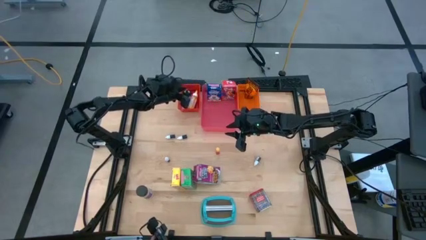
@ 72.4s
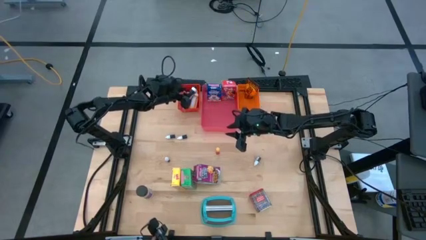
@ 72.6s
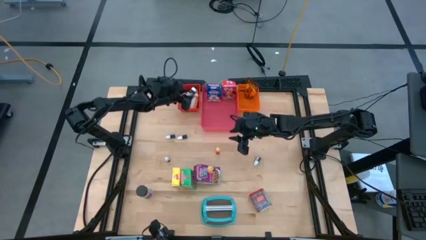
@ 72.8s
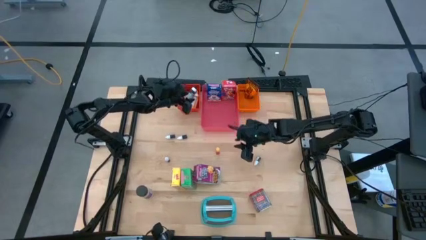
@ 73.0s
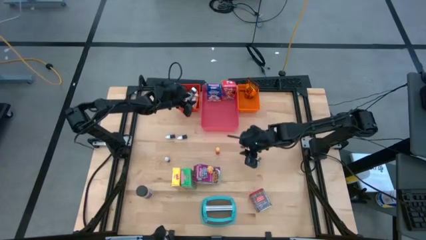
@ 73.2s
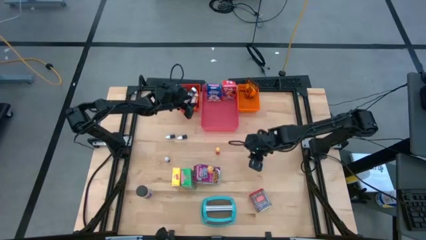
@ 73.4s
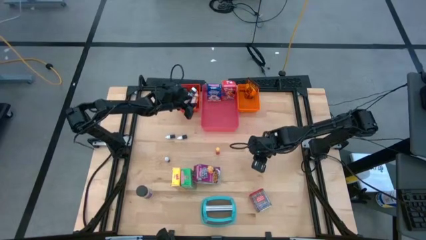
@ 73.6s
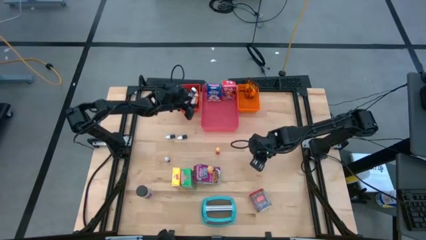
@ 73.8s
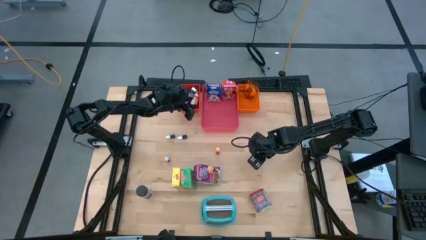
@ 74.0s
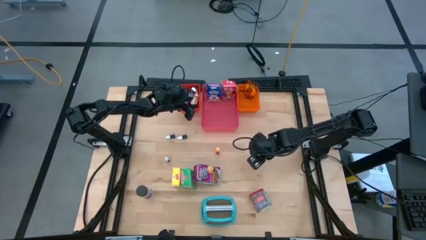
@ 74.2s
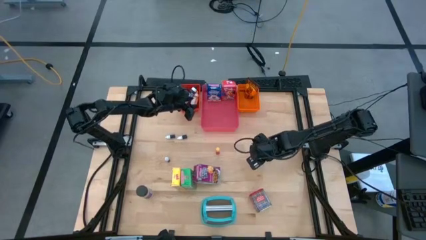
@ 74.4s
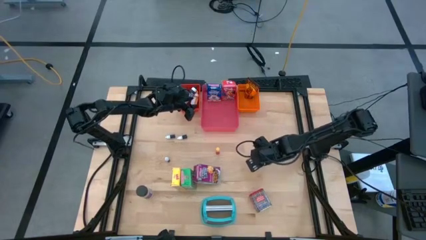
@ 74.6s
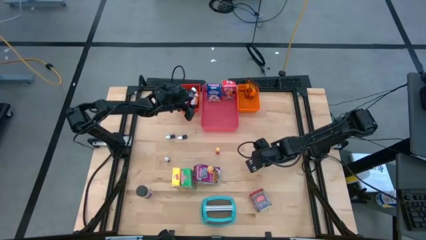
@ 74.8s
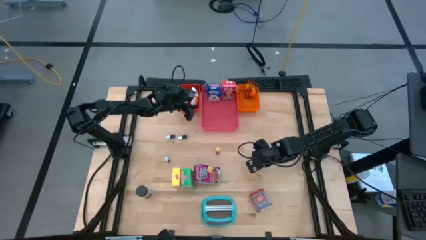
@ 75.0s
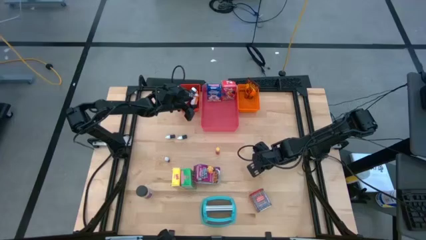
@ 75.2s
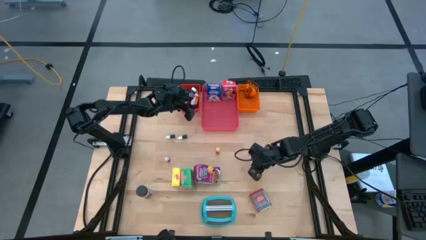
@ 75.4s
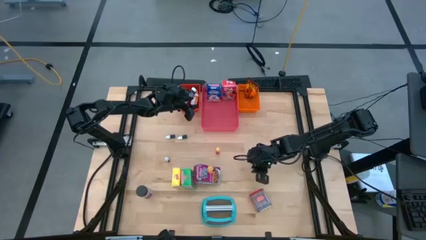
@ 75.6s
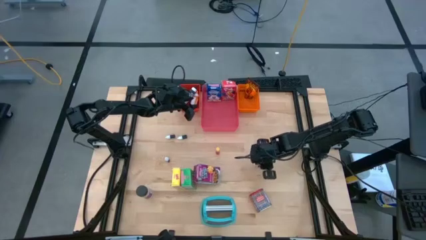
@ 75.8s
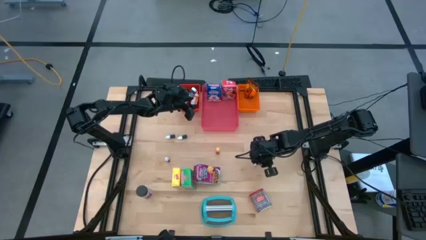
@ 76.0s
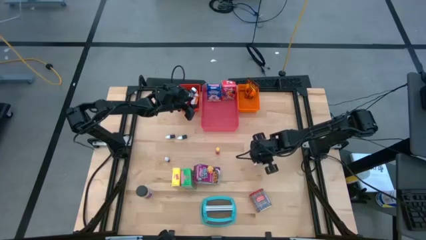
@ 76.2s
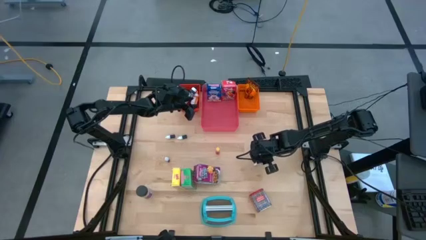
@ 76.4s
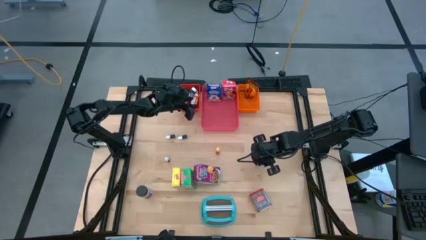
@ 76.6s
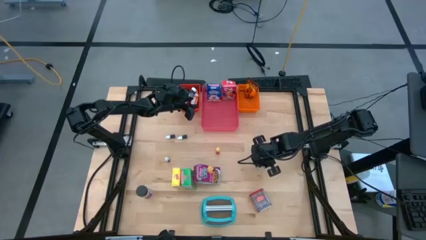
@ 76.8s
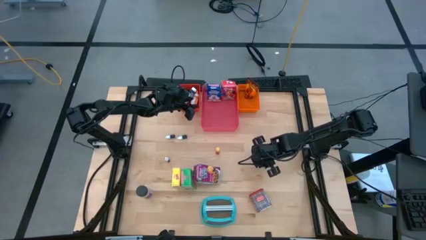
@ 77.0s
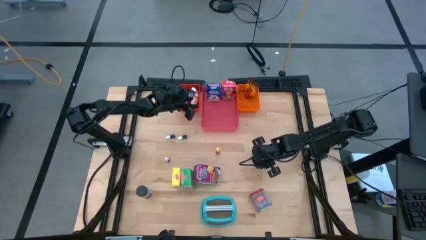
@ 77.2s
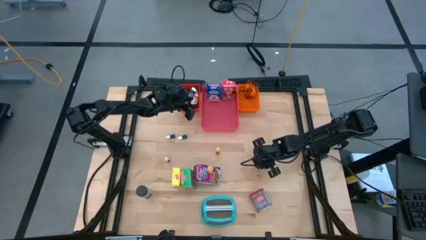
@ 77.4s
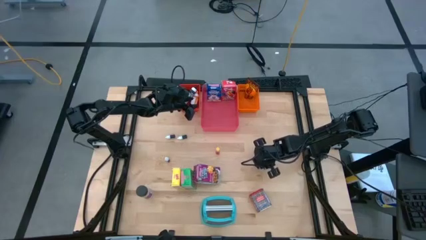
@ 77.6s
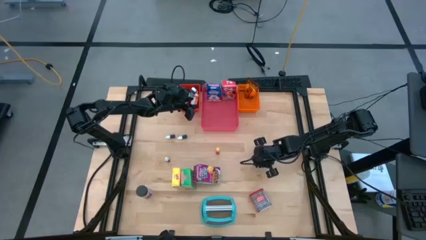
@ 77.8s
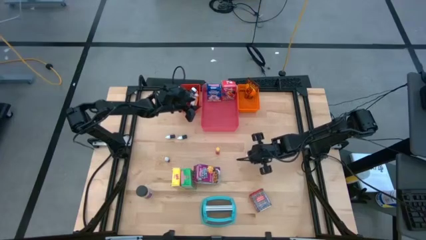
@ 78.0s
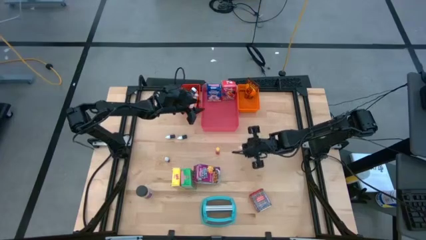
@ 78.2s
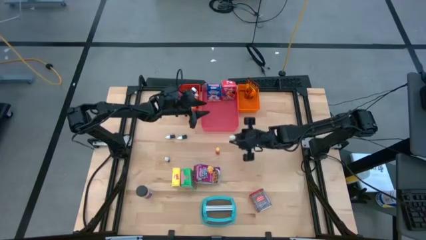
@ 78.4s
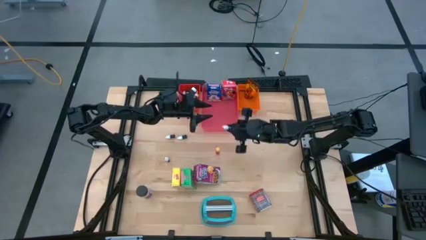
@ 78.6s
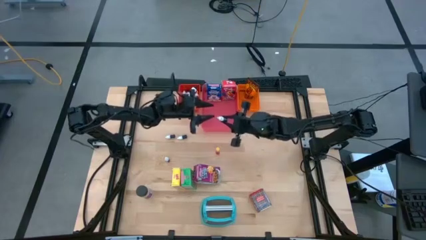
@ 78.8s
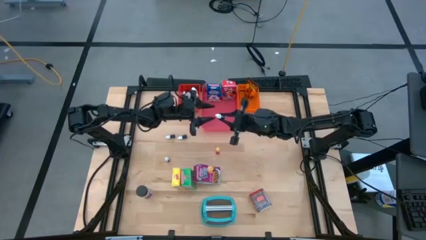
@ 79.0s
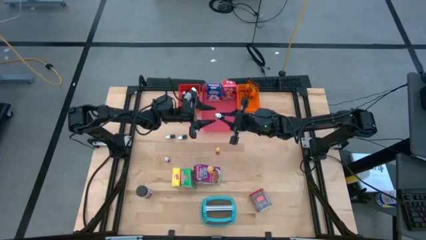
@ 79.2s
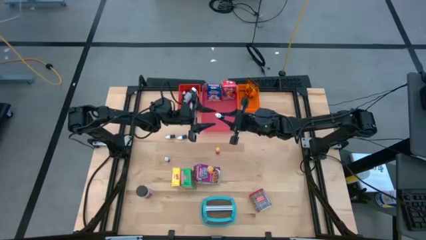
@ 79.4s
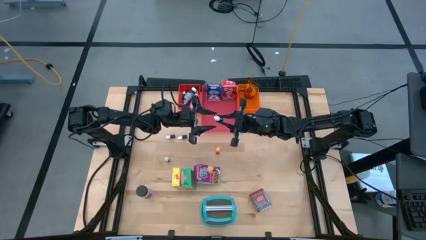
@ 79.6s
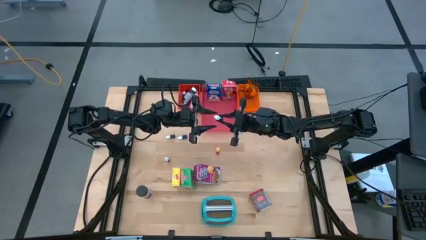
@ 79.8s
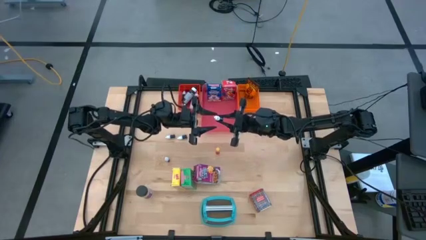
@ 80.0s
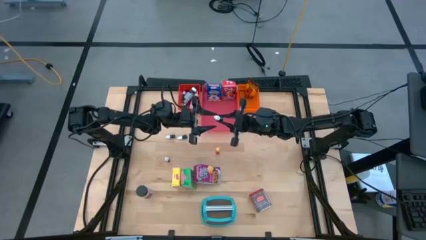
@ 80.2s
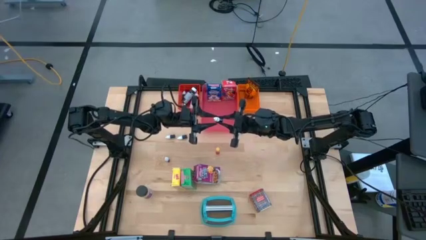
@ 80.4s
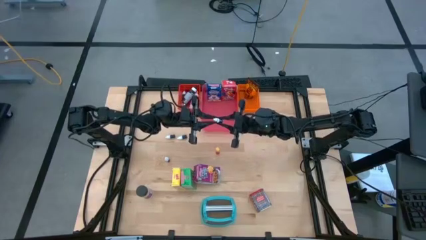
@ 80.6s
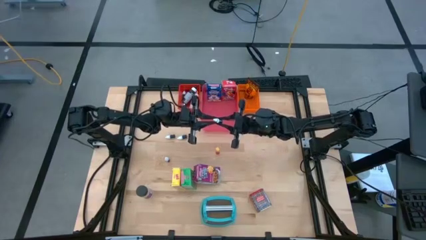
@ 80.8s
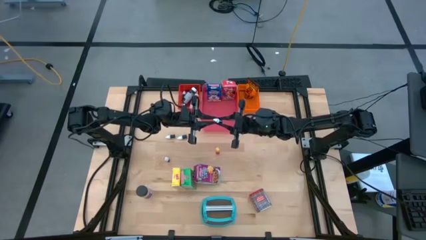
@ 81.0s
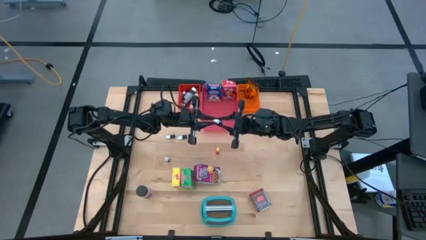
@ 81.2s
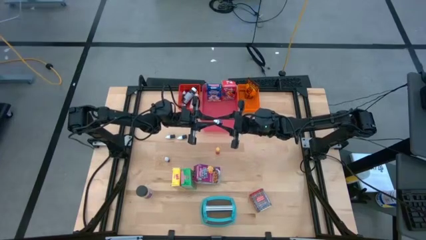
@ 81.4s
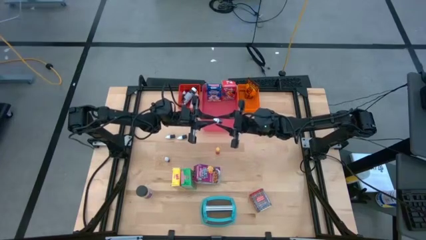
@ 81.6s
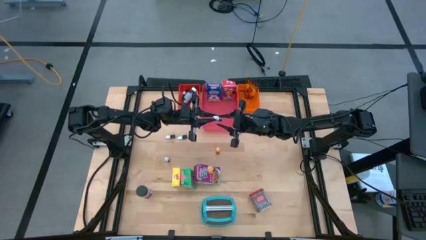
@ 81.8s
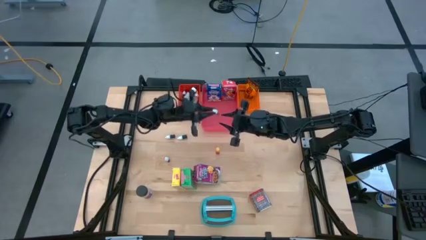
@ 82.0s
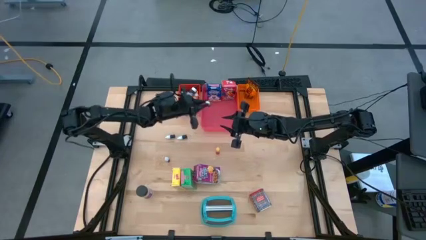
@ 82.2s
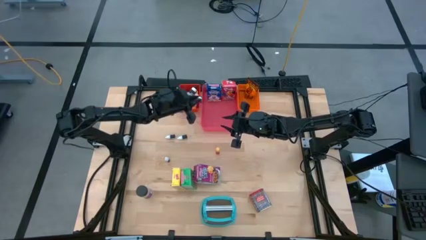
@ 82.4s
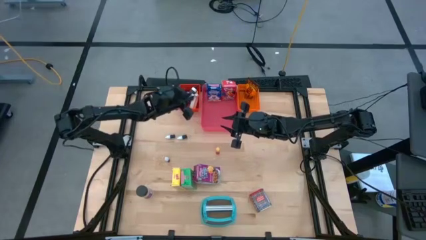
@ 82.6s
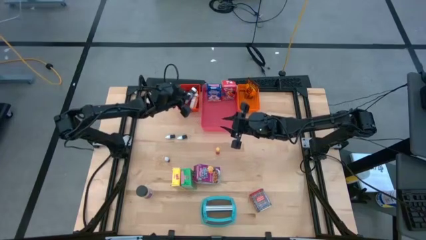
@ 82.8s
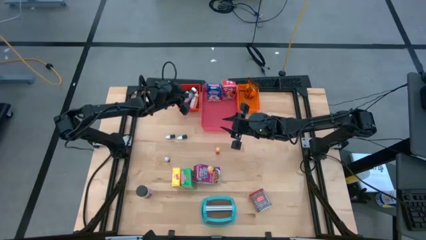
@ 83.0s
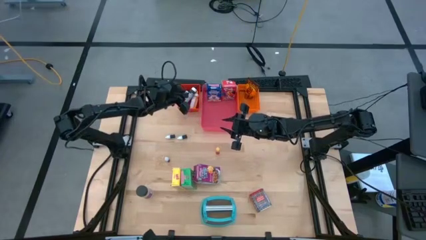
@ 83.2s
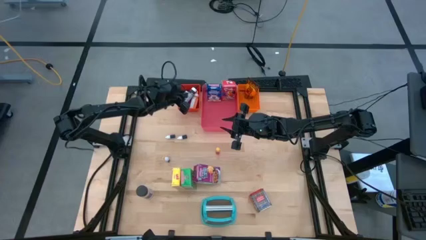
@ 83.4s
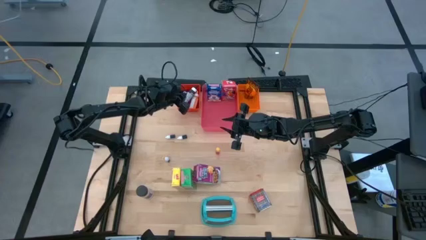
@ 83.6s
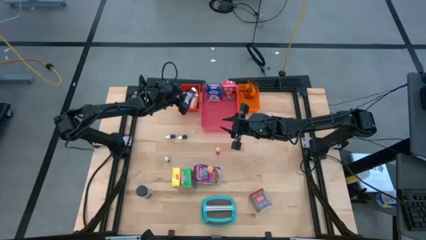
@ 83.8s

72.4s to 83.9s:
Task: Pick & Place Kitchen Items
Put the small brown food coloring bottle into the red bin

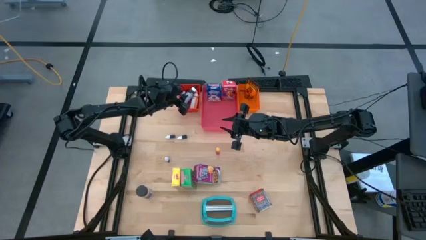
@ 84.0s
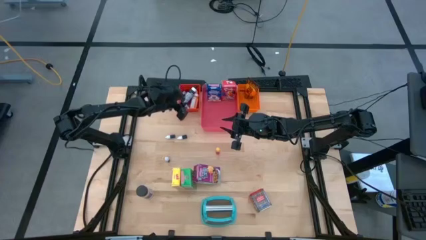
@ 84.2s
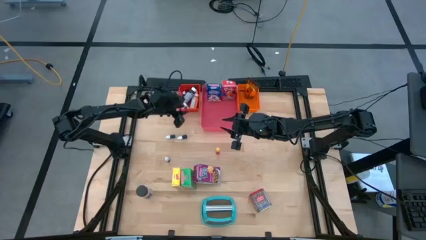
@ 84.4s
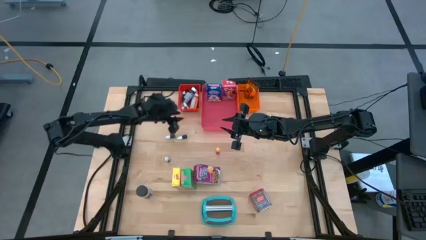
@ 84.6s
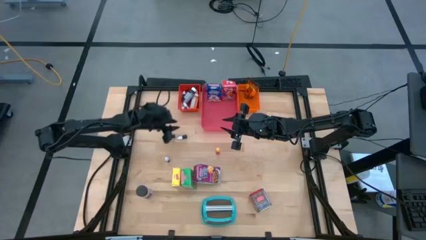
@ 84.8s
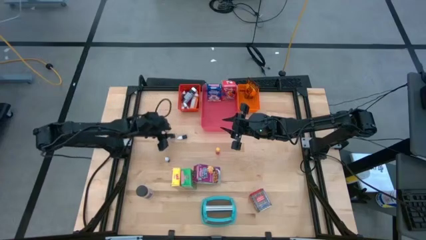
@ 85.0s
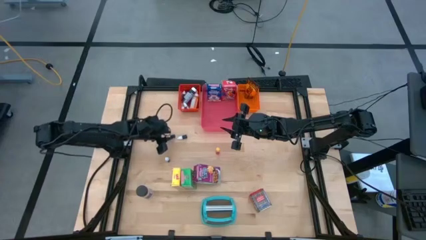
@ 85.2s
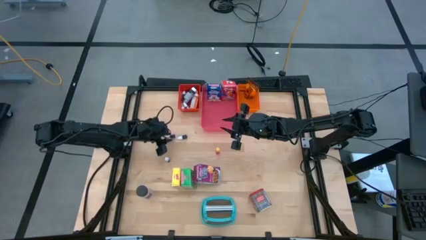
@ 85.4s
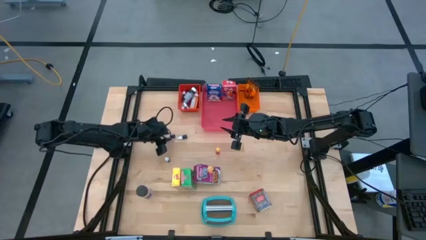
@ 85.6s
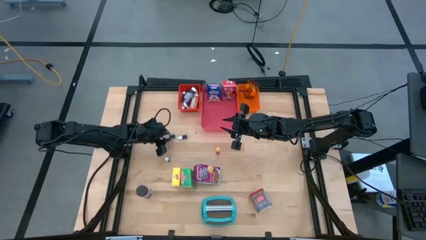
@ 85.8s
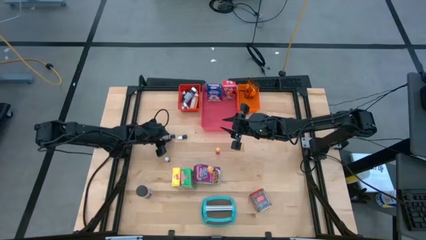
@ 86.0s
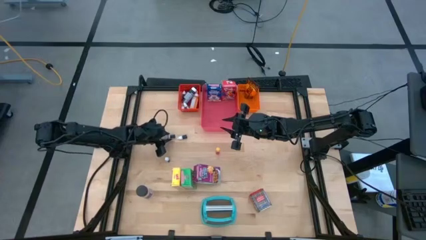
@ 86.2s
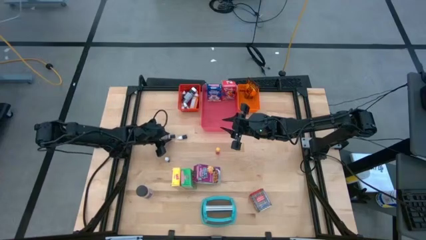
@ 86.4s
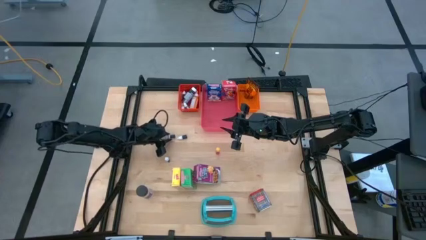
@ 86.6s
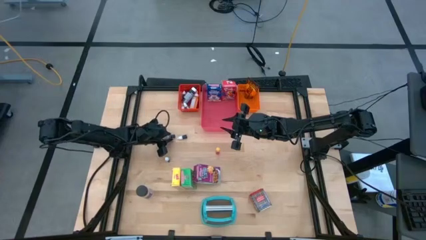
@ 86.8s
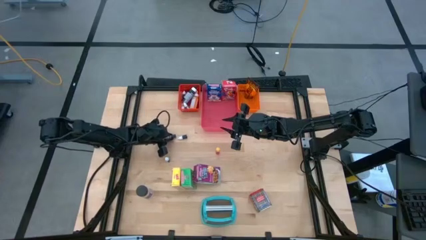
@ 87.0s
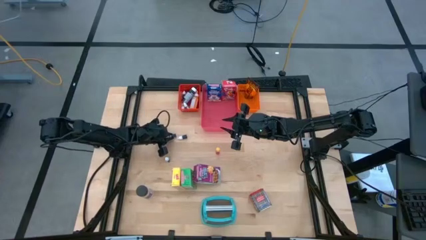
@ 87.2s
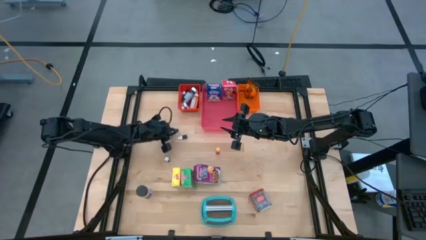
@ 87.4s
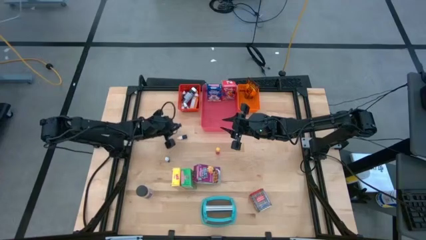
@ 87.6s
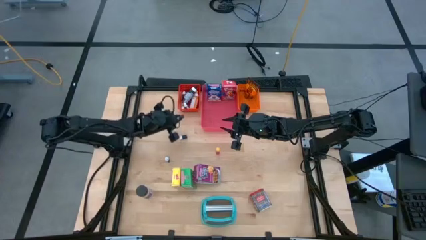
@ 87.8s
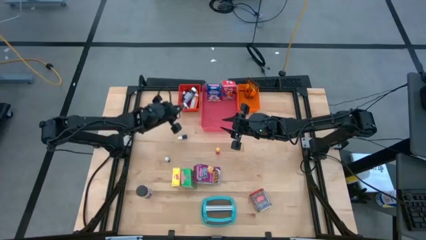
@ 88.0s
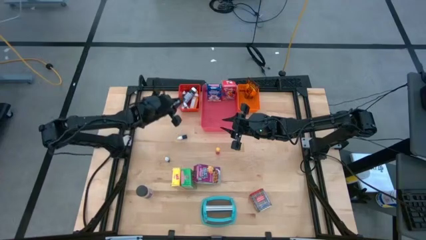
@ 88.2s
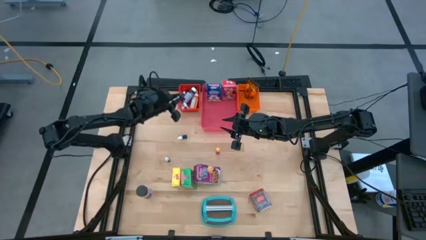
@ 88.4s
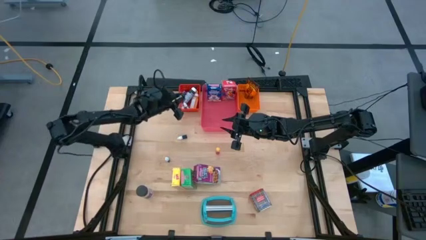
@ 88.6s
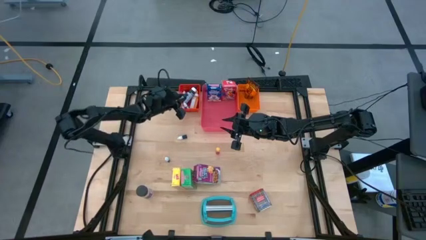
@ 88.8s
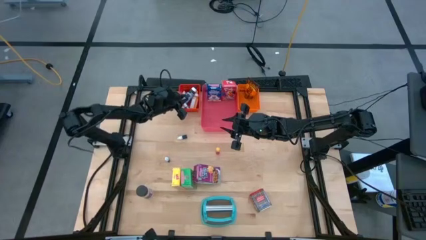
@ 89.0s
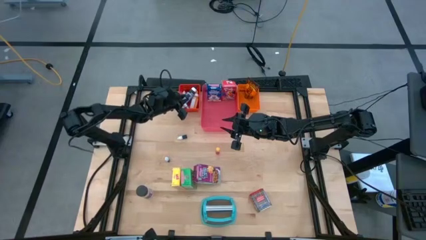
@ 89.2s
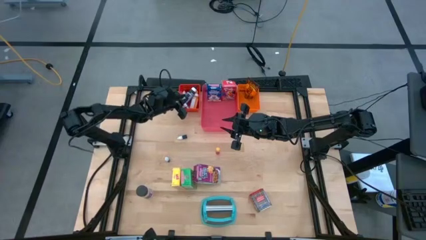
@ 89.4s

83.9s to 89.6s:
Put the small red food coloring bottle into the red bin
